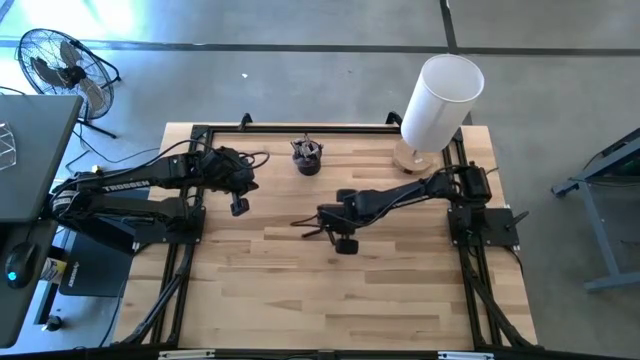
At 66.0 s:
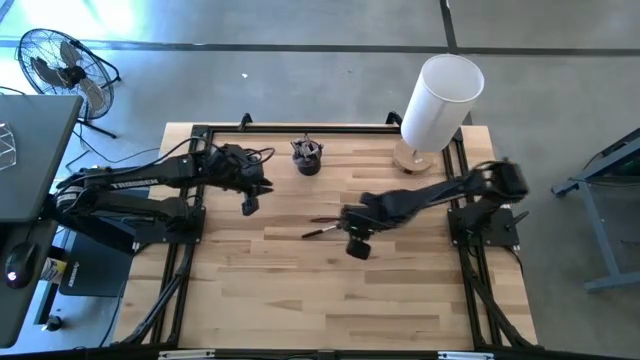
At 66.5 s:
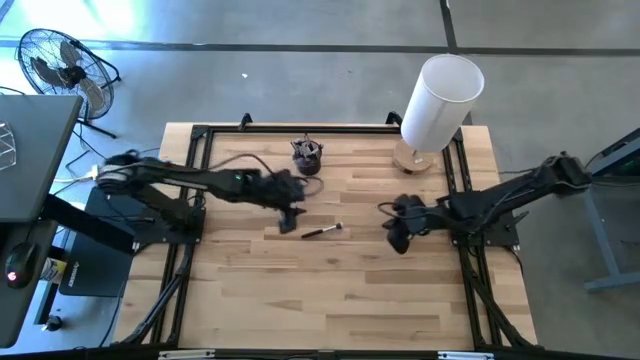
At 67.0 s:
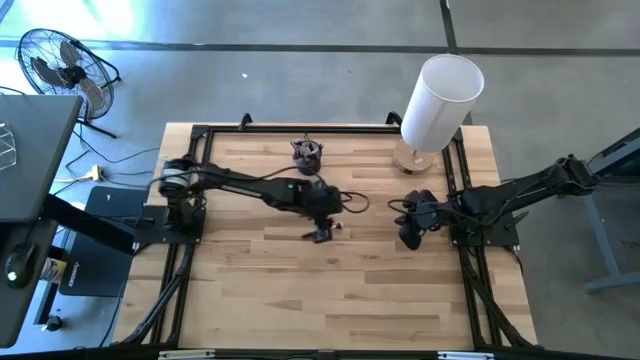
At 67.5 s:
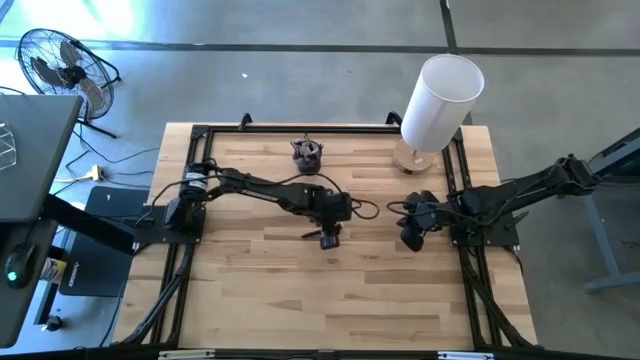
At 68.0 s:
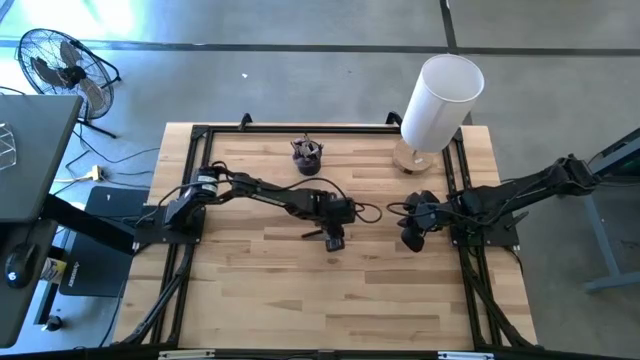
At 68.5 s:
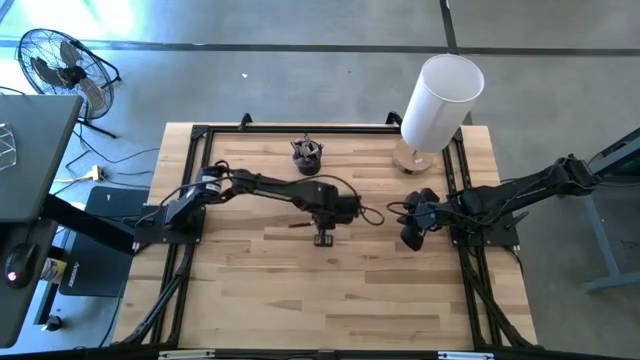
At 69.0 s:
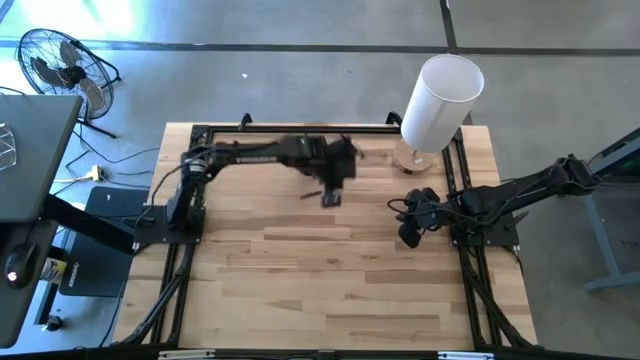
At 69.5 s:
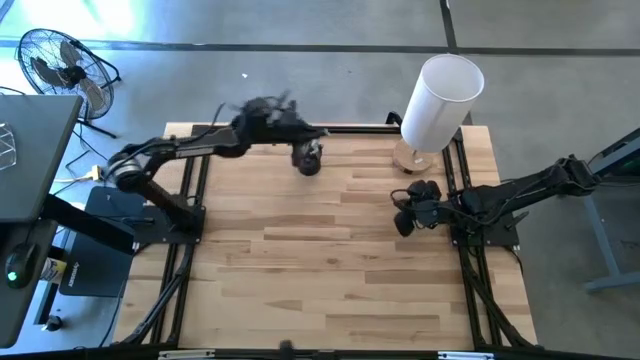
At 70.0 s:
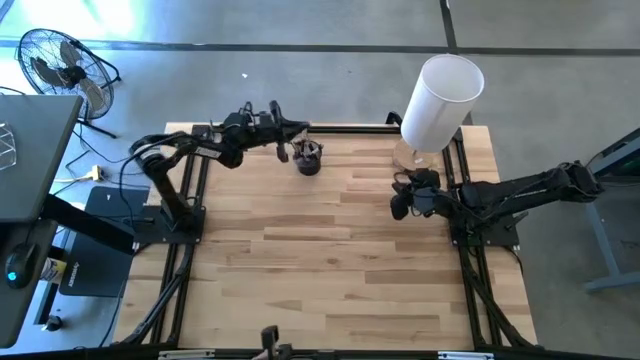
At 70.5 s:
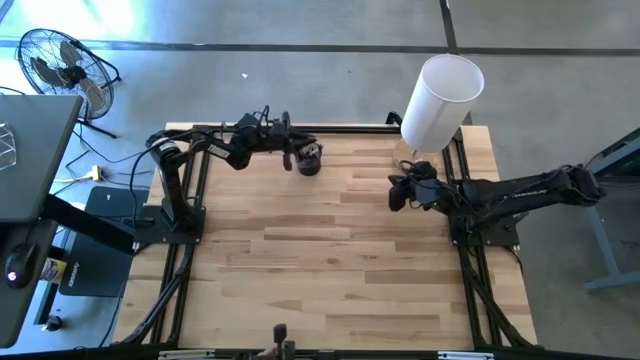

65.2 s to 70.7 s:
Task: Put items in baskets/containers
Put the blush brush into the pen holder

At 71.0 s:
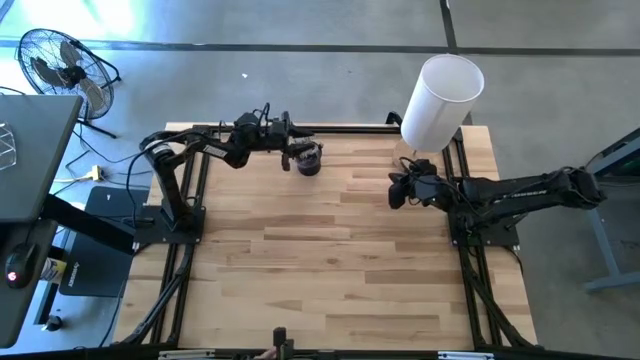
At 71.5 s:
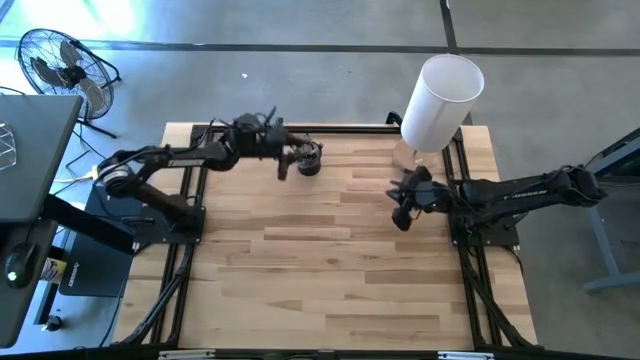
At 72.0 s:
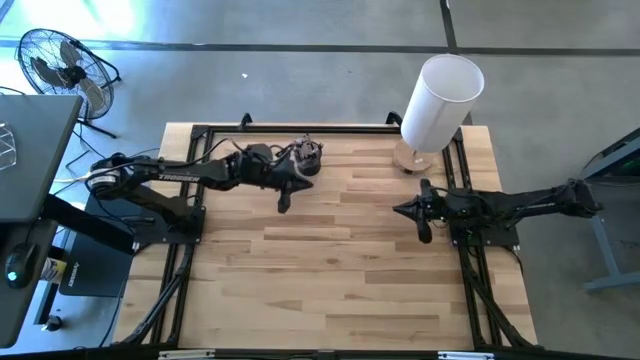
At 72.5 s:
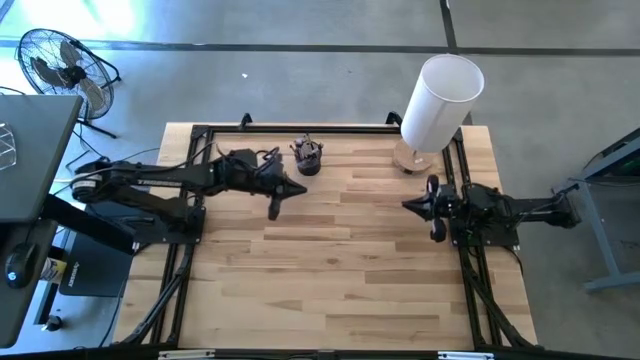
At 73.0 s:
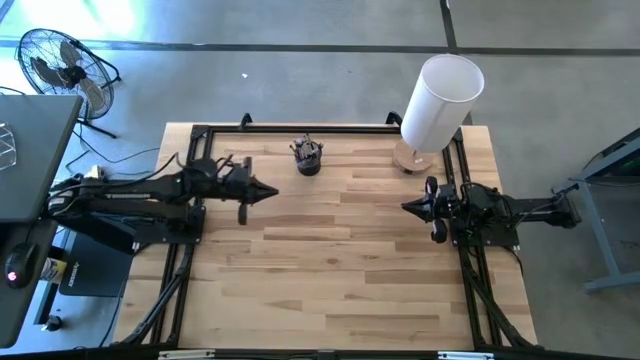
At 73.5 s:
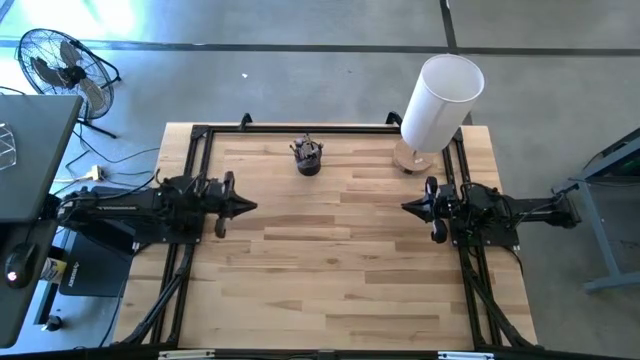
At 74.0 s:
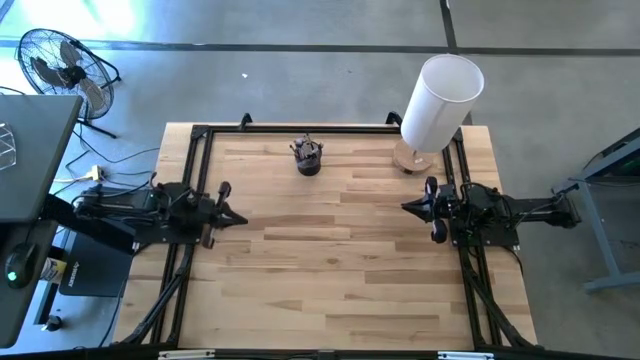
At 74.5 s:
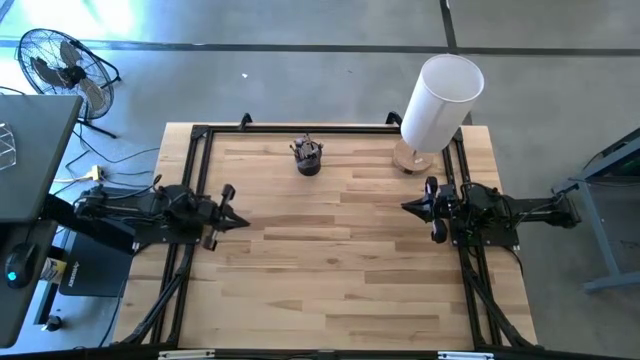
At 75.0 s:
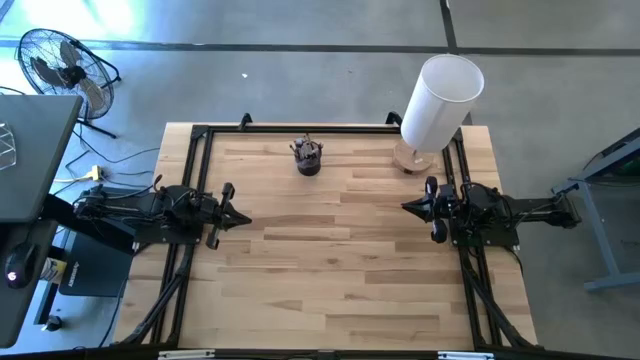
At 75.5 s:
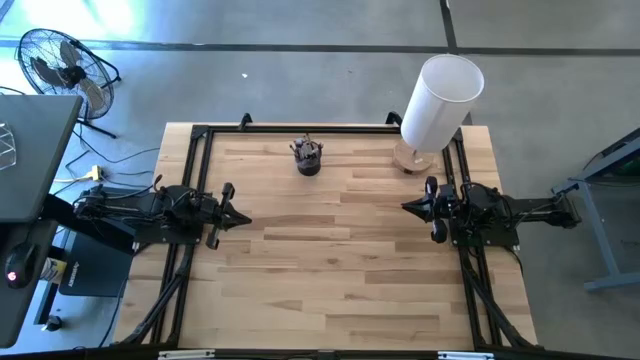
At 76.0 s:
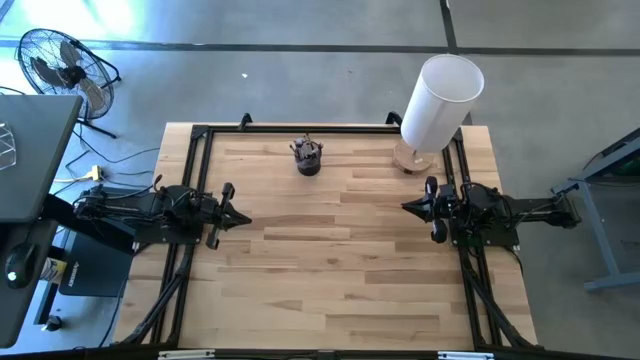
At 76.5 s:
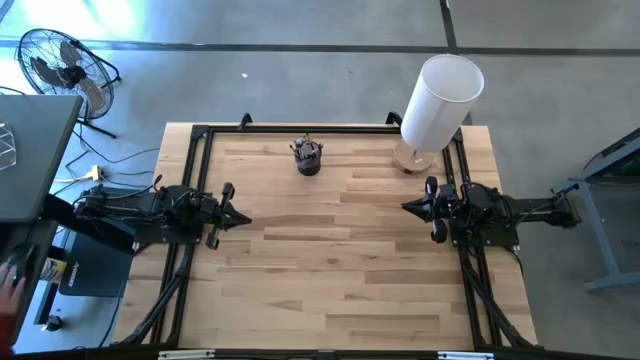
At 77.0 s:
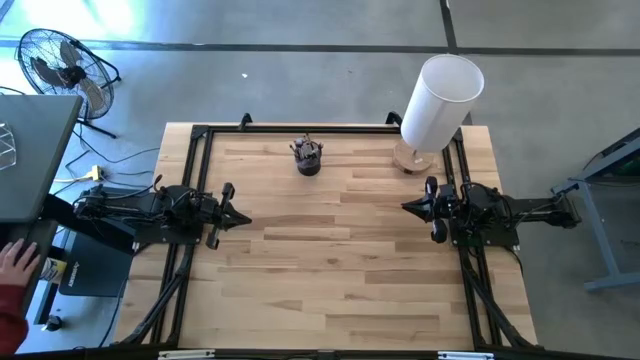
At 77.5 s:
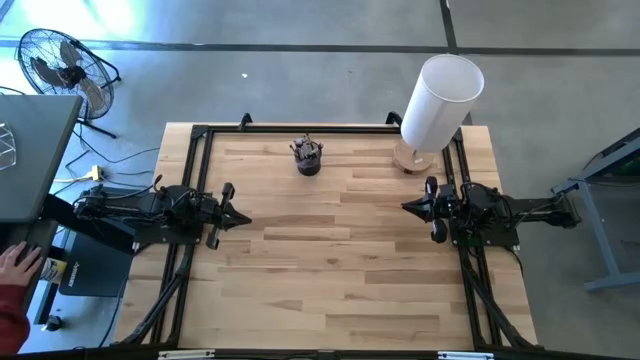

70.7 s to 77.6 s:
Return to Home Position

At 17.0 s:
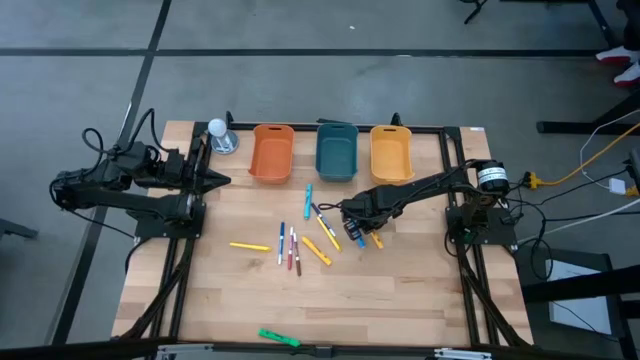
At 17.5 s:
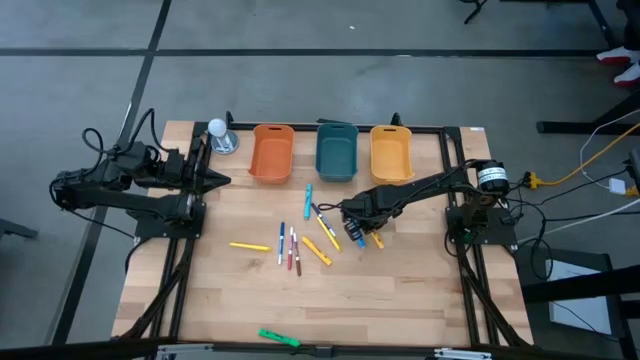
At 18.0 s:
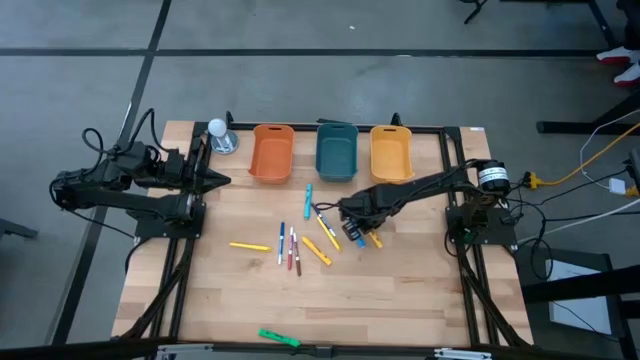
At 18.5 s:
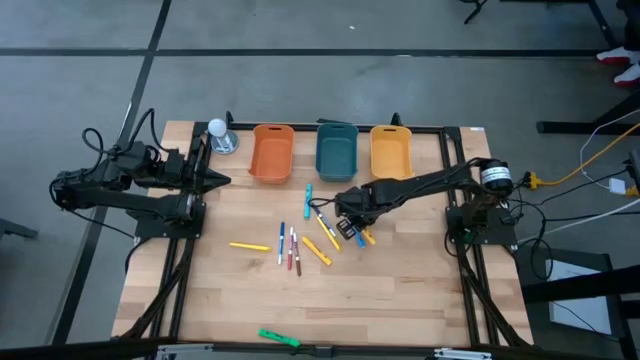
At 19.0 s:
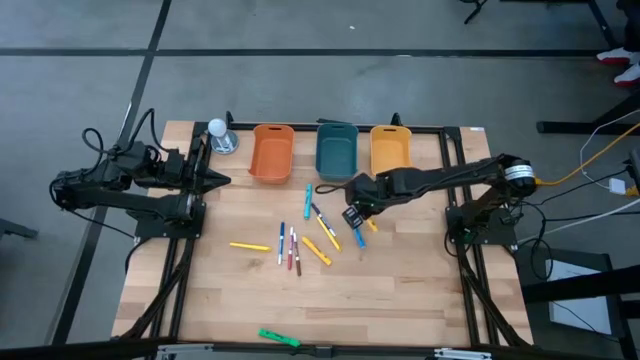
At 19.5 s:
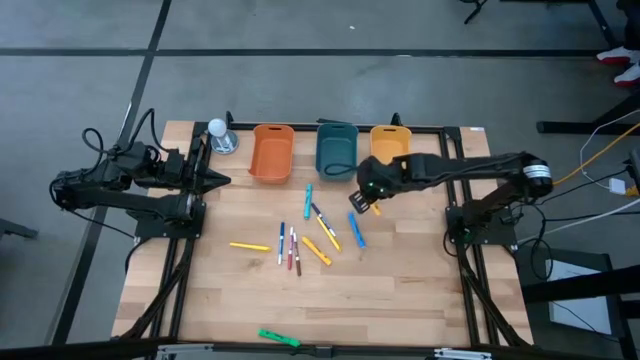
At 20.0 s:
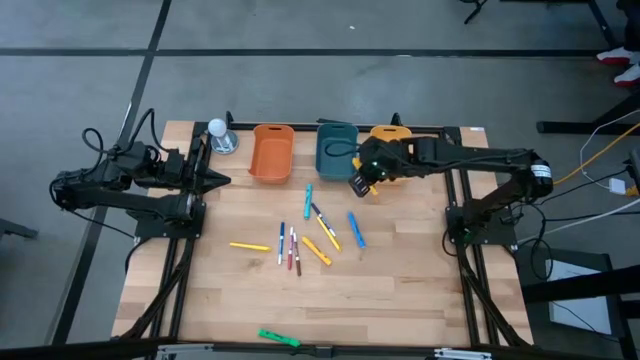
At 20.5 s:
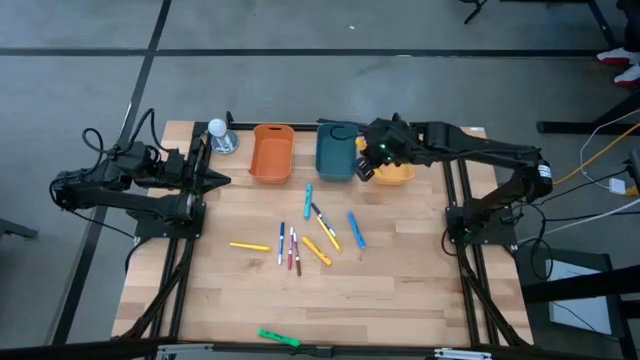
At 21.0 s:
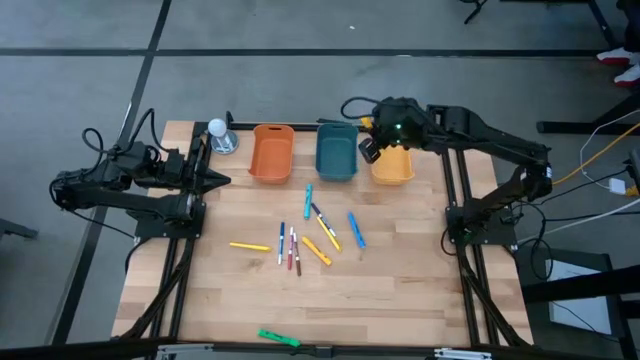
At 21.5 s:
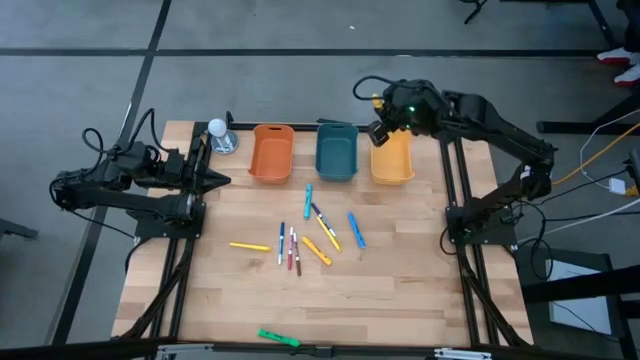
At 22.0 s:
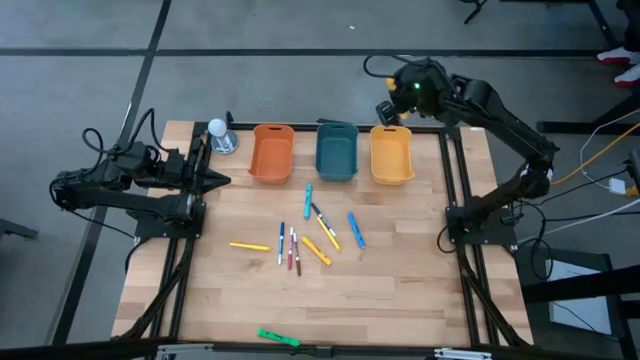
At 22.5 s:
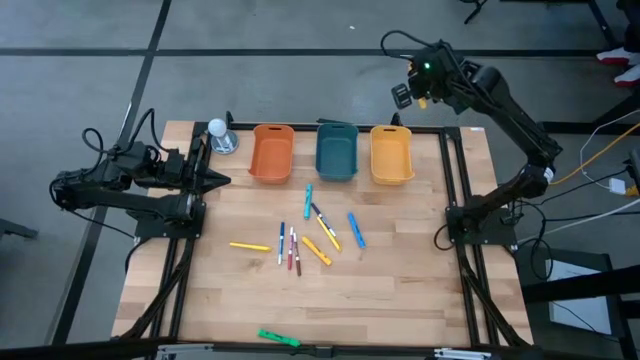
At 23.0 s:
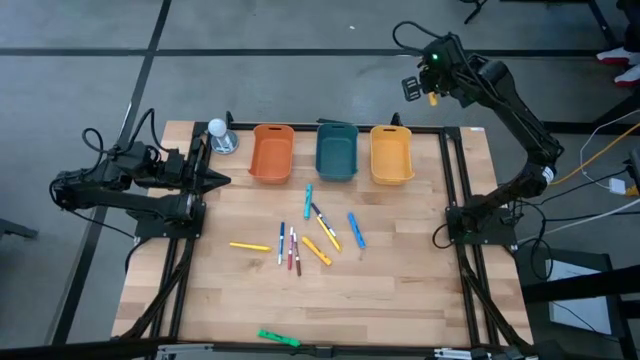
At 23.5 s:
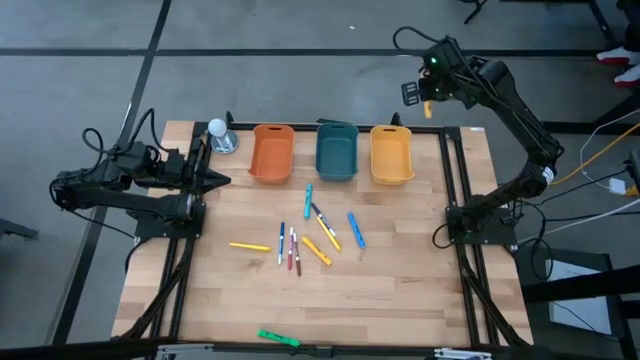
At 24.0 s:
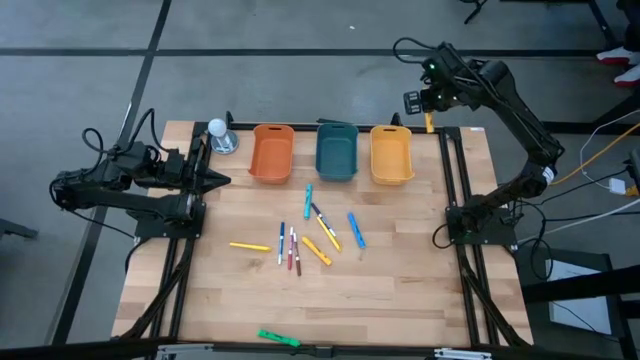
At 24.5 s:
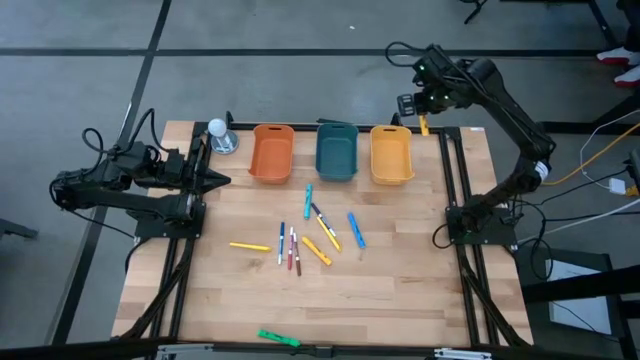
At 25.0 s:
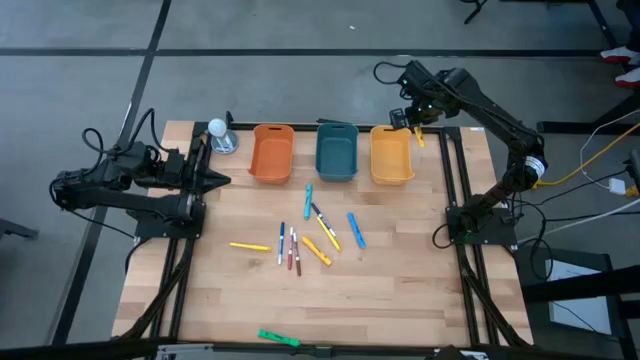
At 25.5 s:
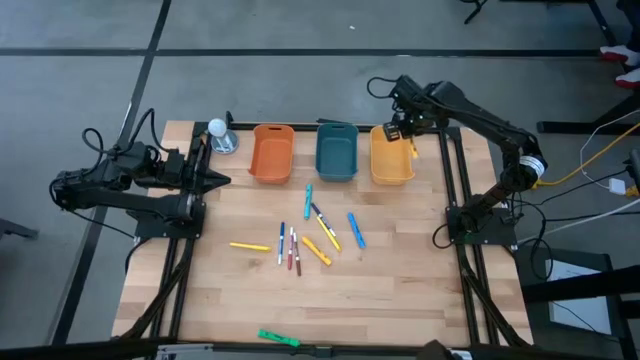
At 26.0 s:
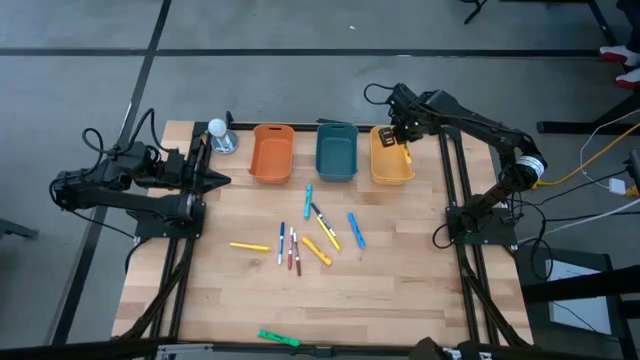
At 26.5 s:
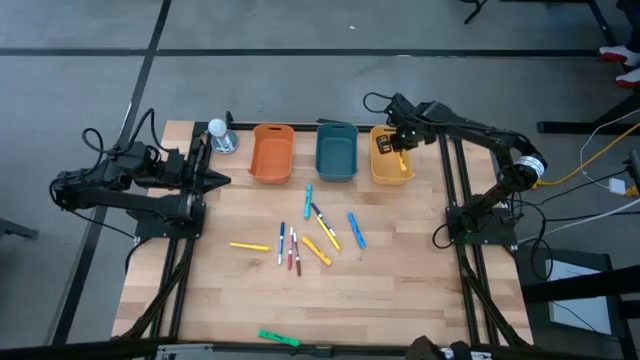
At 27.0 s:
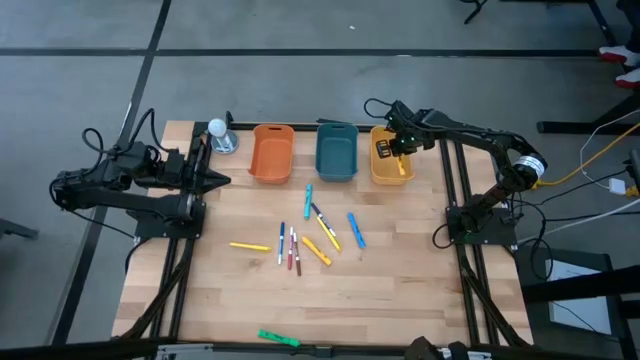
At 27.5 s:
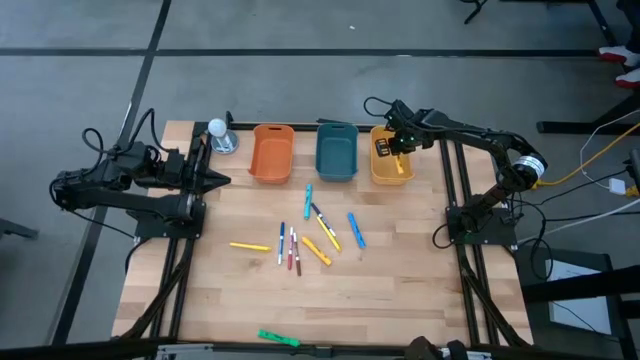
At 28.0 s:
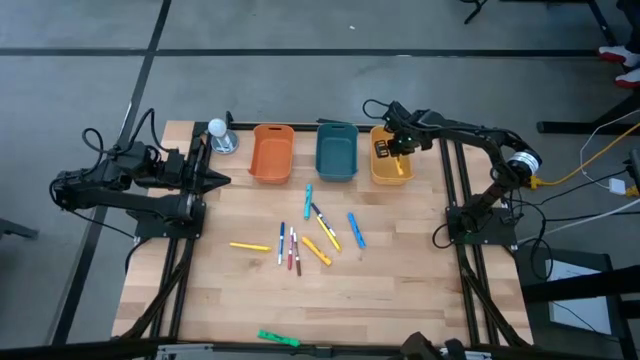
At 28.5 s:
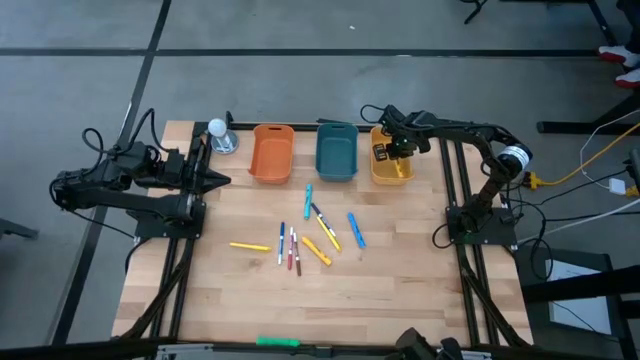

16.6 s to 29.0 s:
Task: Pick & Place Markers
Put the right yellow highlighter pen into the yellow bin
